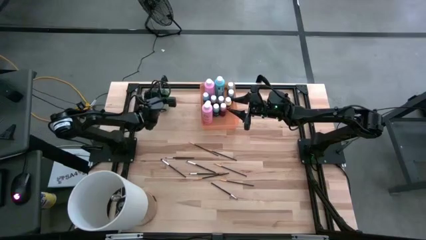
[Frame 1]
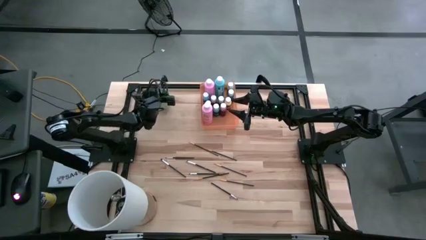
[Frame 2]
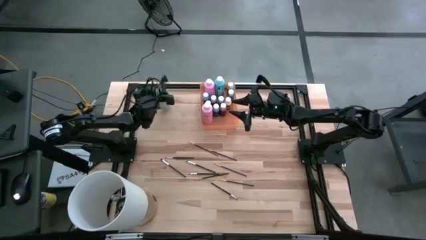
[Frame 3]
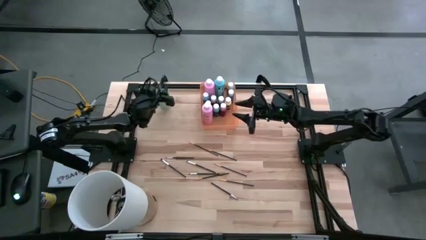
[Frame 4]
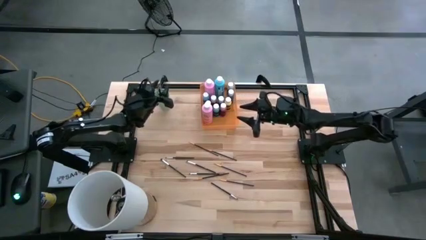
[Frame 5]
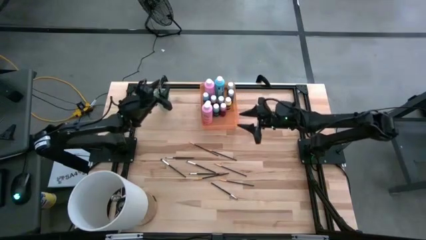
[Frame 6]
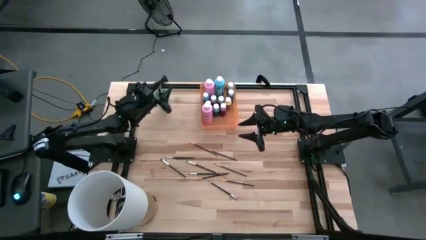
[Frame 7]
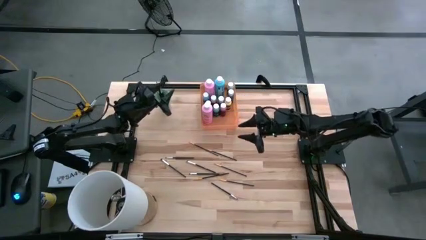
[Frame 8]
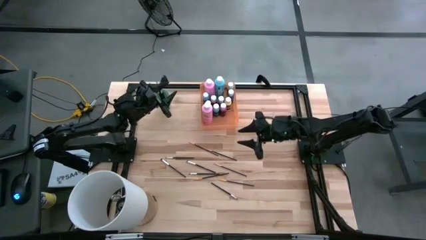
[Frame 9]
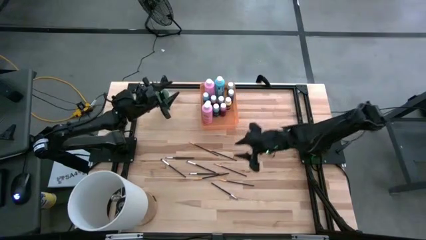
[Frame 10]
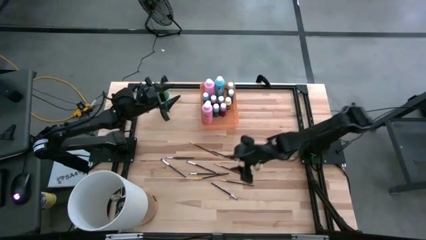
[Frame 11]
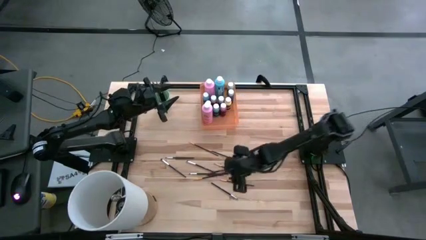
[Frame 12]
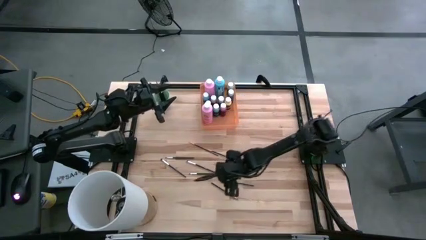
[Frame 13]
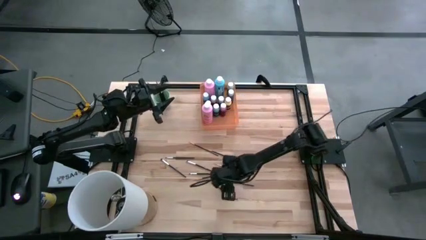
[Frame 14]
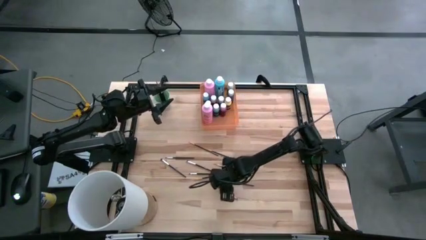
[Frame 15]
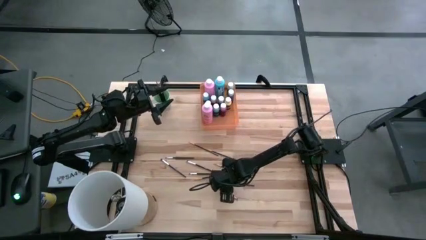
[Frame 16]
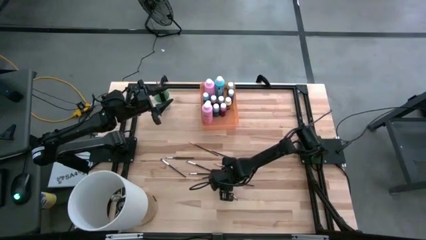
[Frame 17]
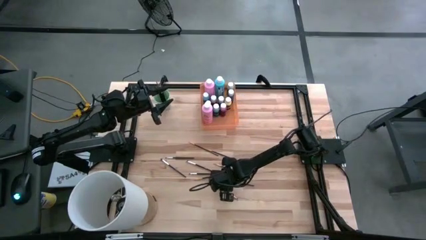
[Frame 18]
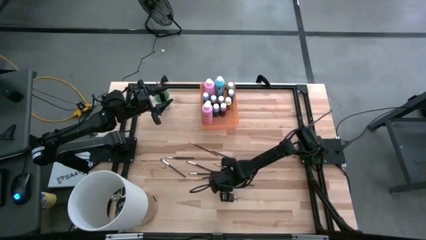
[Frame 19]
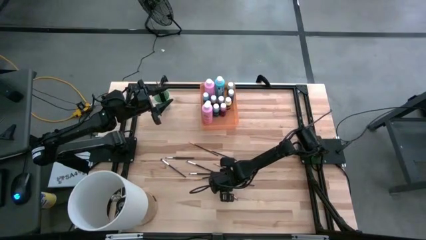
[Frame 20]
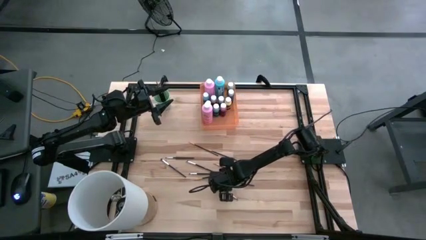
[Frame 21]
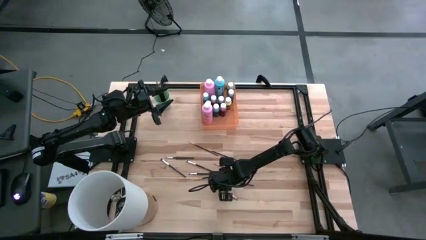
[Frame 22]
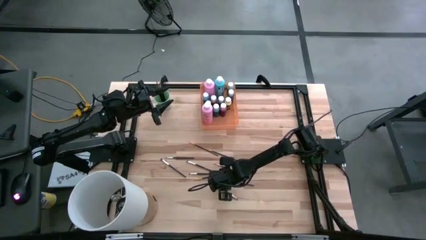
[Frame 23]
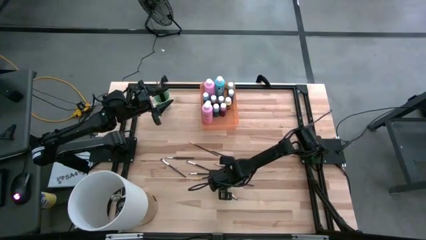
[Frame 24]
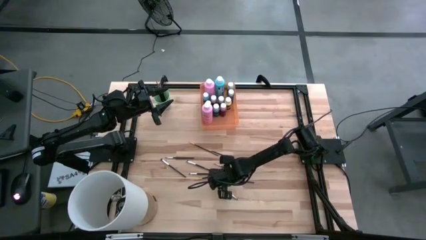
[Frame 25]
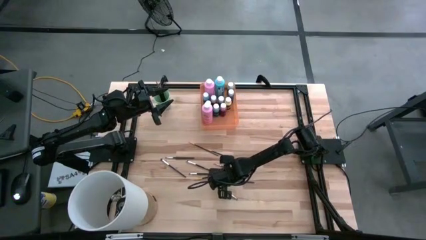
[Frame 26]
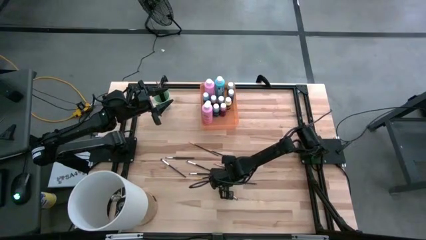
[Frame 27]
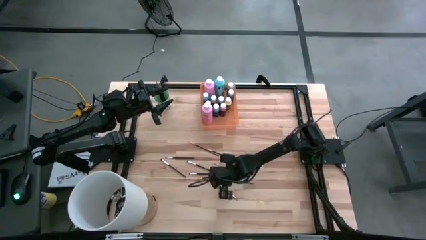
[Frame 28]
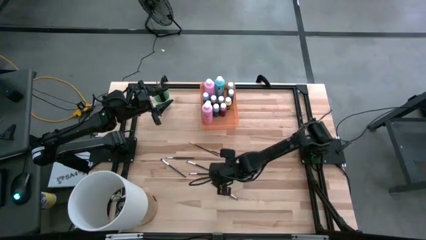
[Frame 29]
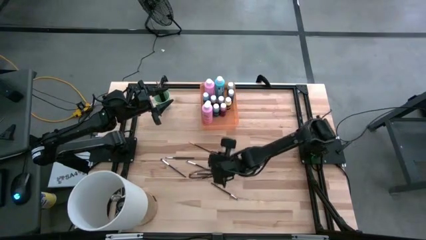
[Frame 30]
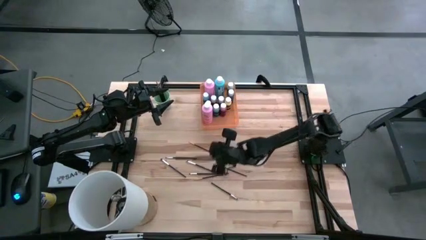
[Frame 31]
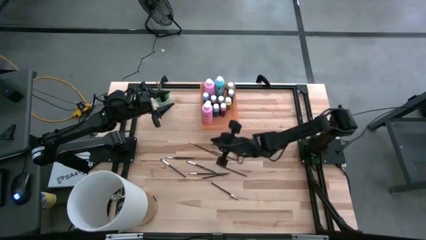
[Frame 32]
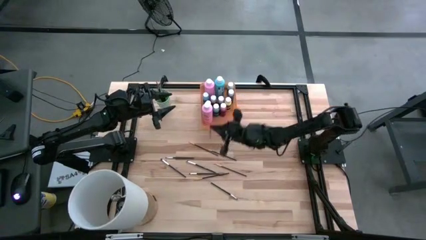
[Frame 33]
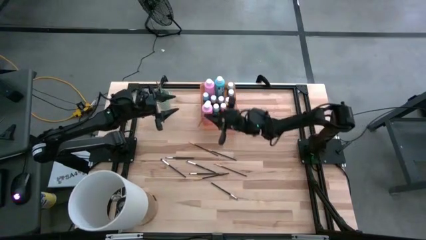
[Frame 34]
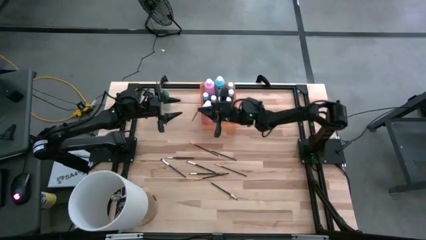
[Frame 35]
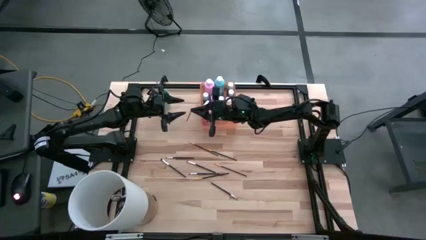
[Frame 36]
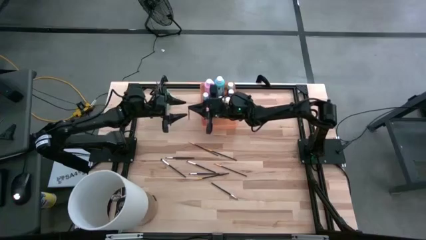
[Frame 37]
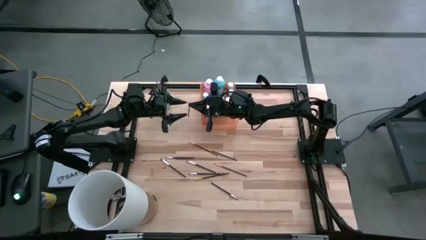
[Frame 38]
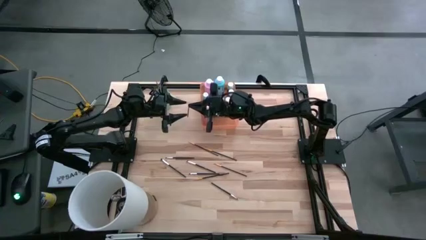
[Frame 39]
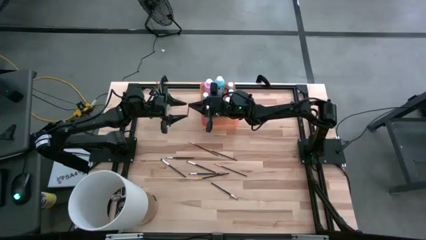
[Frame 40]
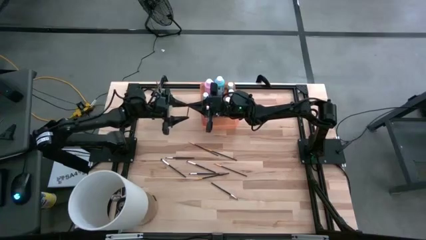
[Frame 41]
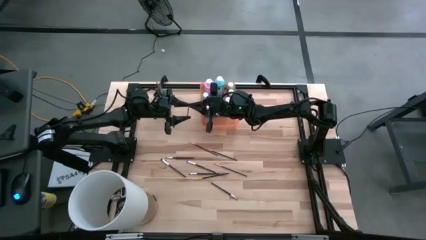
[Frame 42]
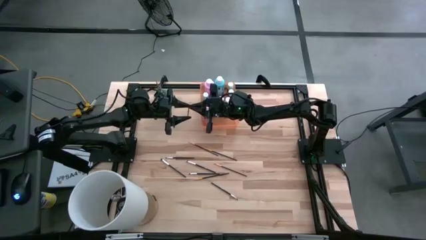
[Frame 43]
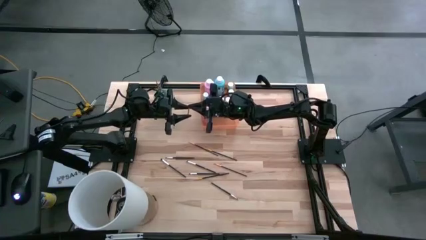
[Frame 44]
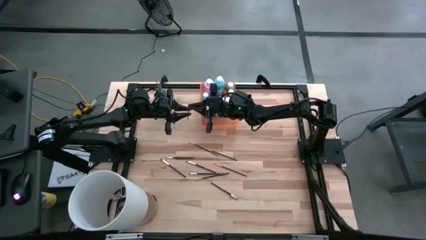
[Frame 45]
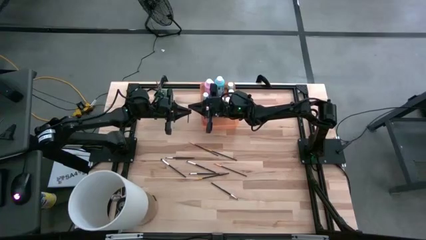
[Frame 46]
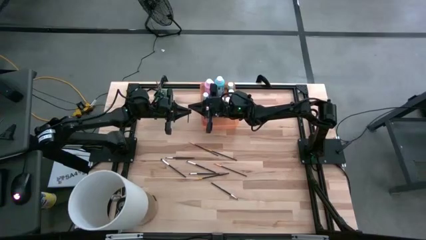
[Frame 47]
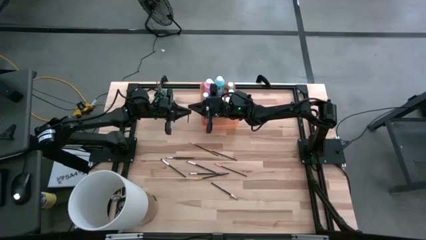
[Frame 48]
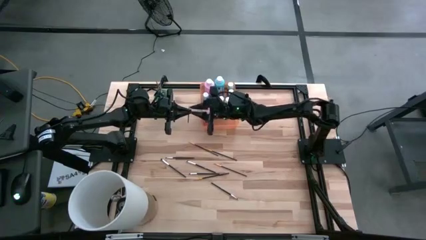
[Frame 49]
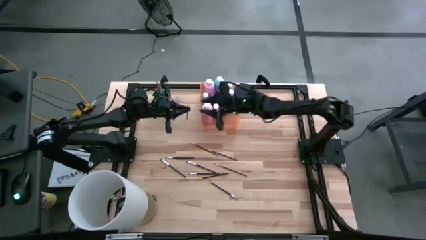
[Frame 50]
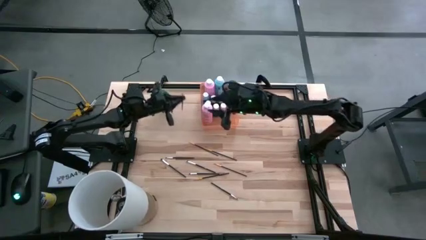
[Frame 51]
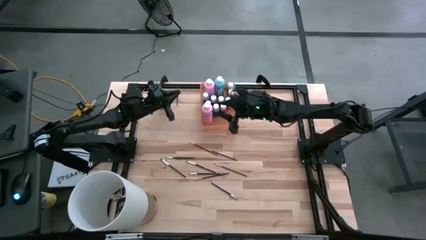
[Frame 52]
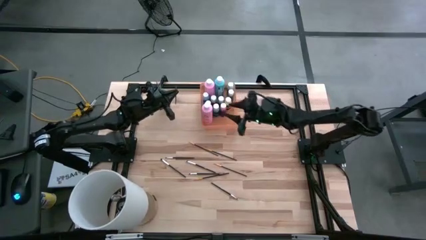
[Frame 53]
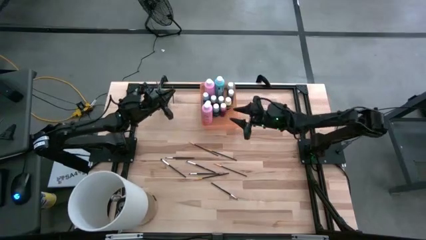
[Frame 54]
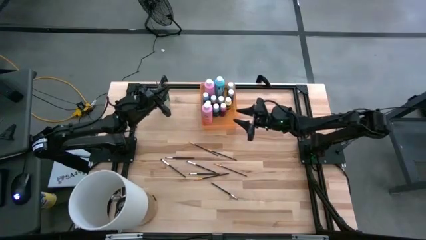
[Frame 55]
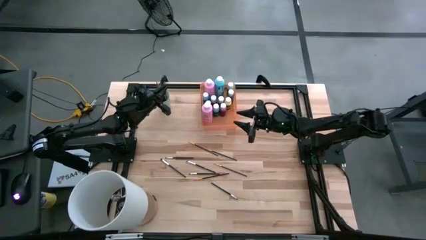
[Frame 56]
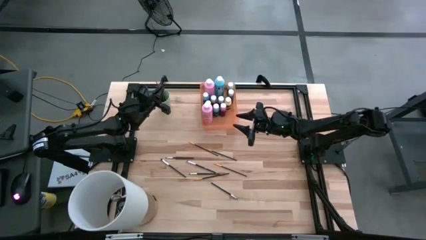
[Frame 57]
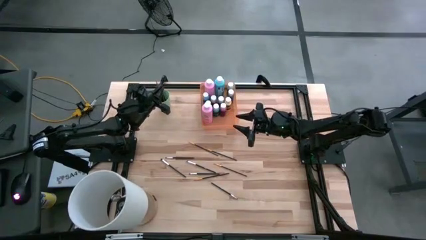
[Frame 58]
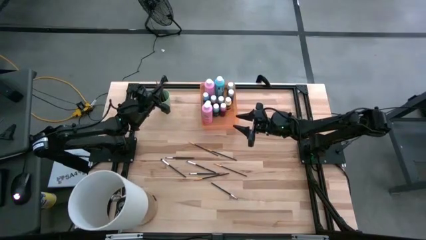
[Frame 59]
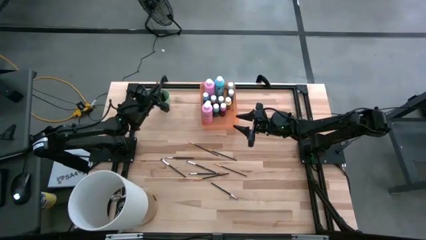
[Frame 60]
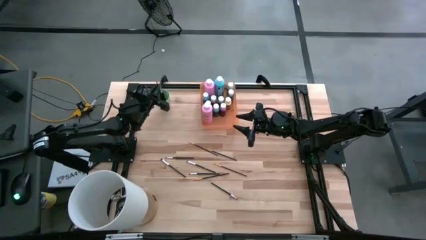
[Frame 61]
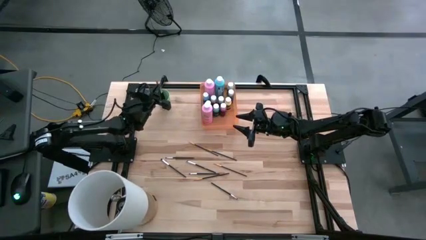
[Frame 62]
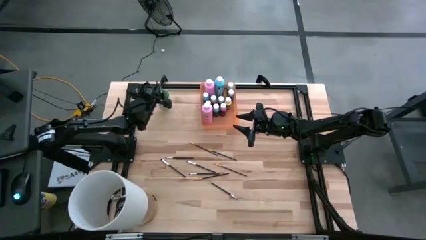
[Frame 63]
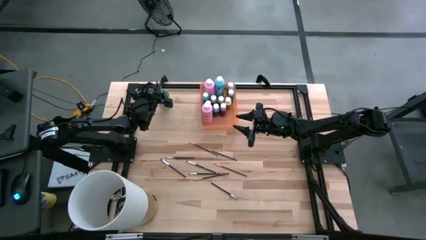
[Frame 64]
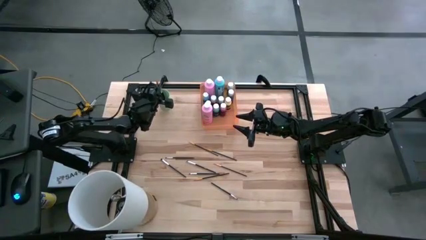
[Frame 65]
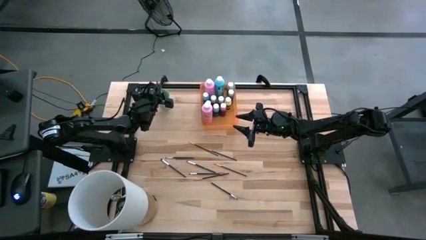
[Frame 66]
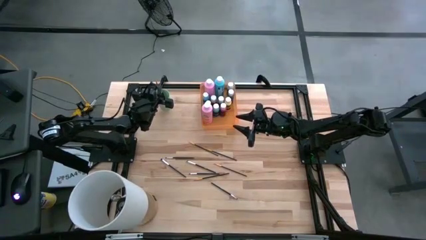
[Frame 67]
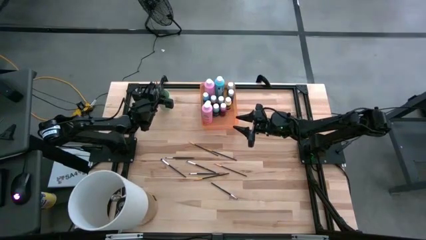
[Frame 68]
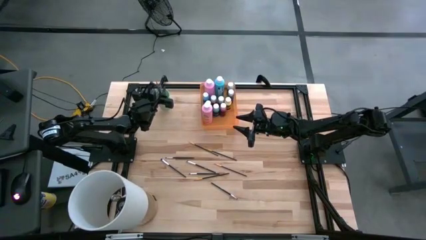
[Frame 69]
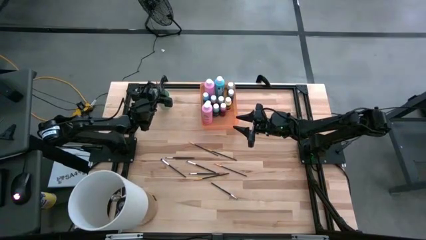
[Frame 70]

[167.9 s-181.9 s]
Task: Pick & Place Paint Supplies
Put the orange paintbrush into the cup
